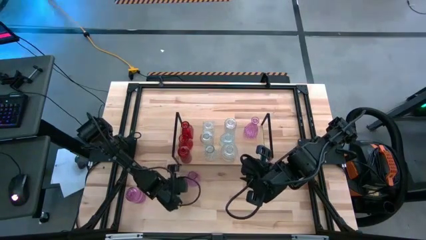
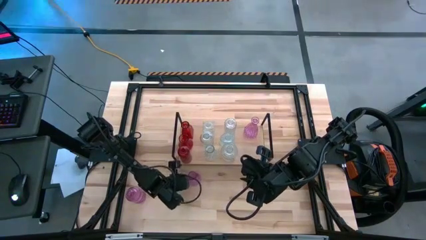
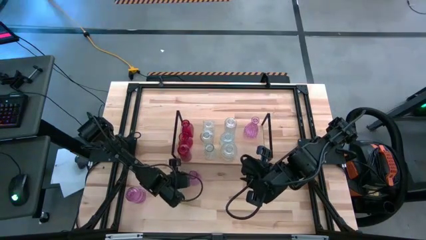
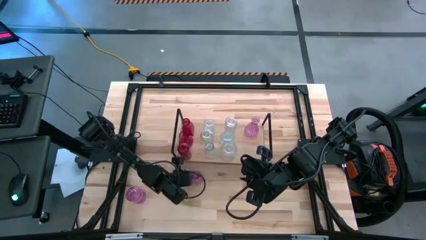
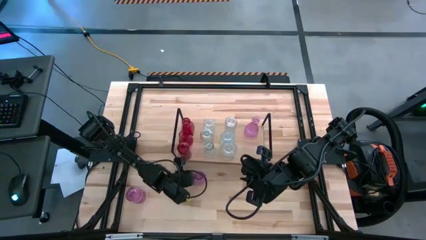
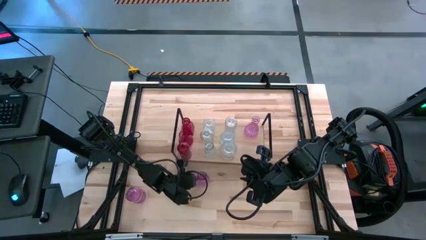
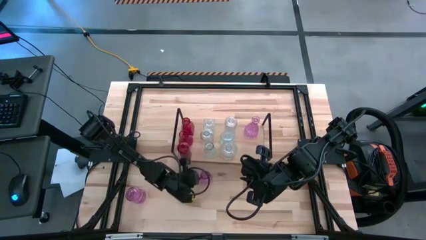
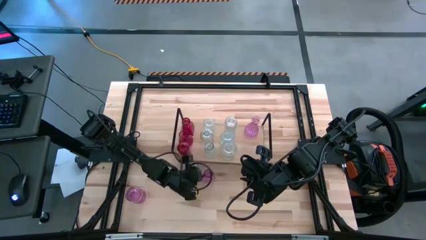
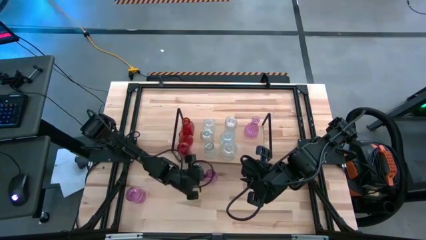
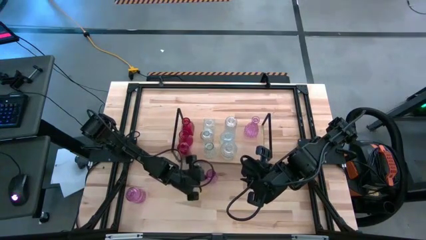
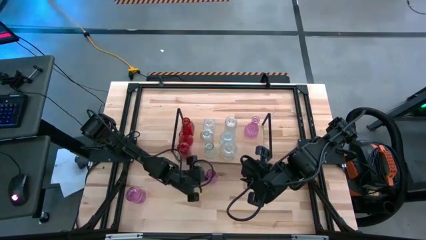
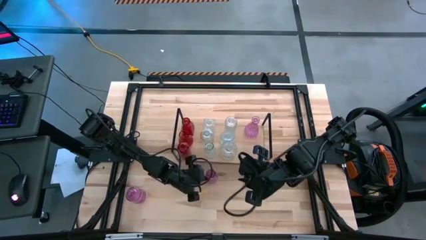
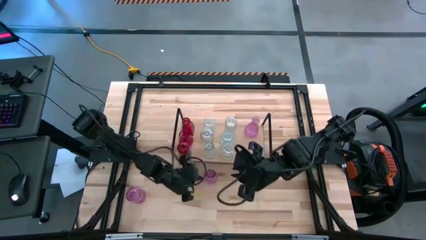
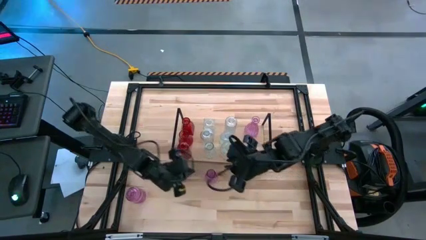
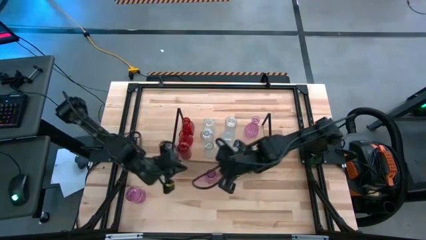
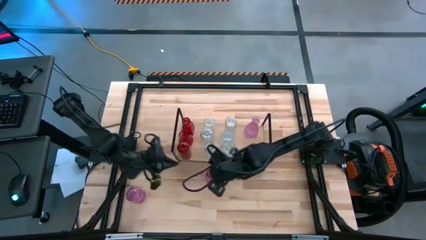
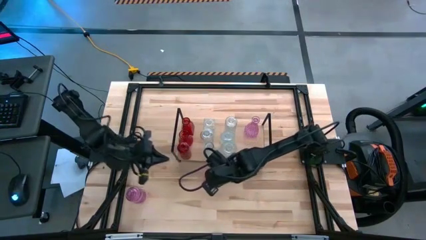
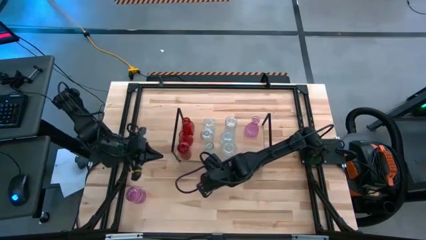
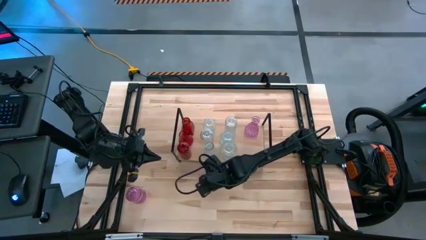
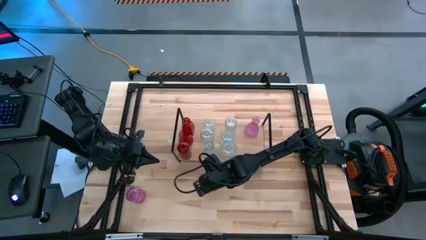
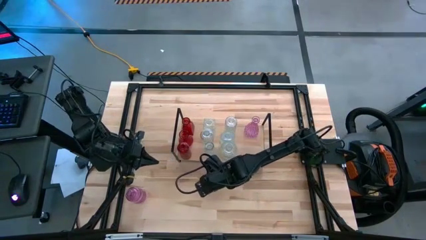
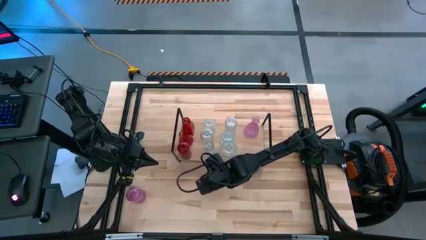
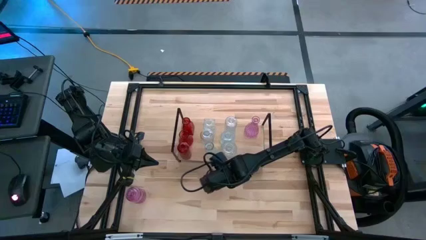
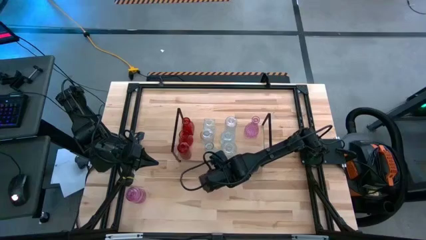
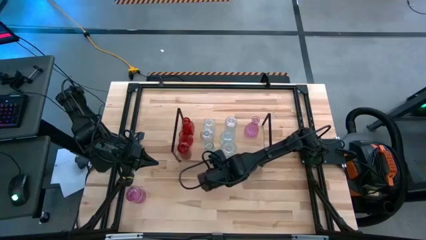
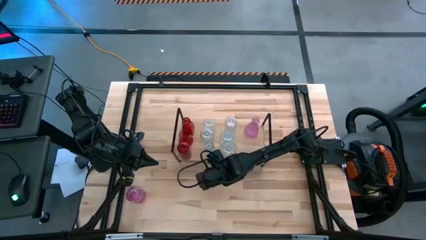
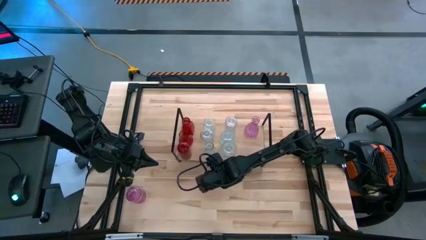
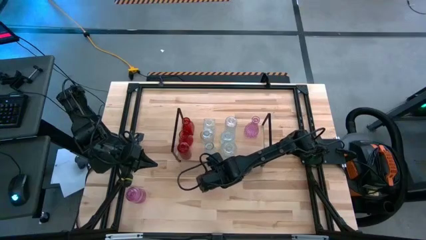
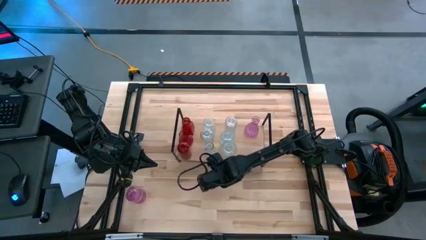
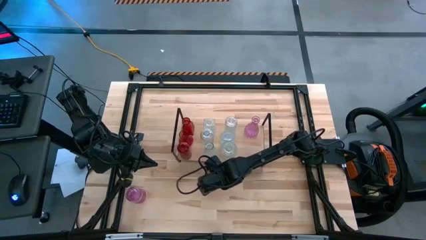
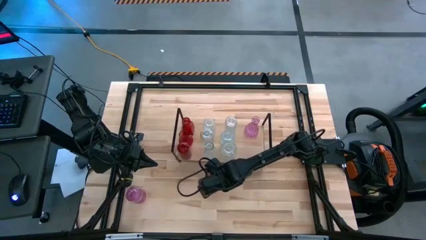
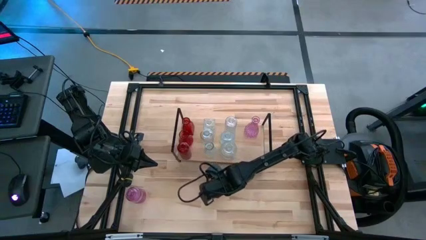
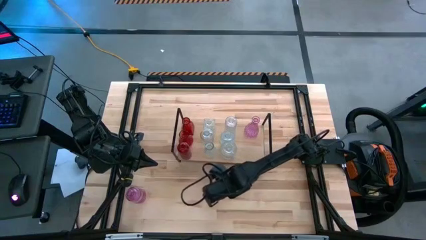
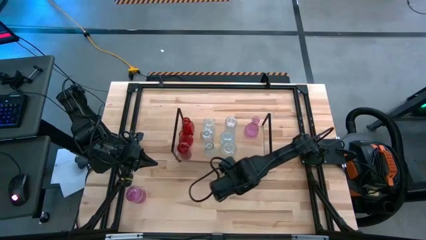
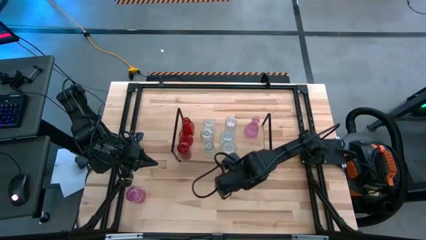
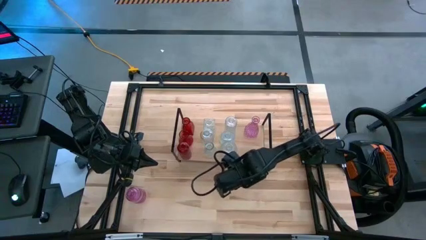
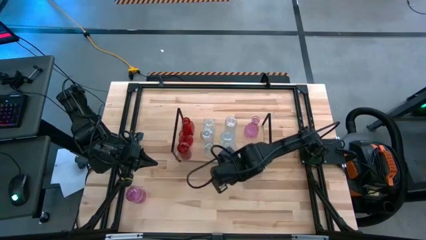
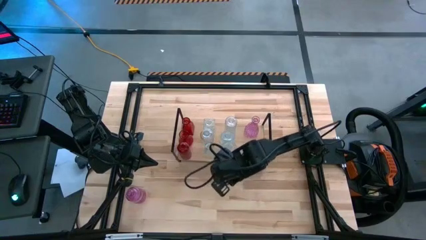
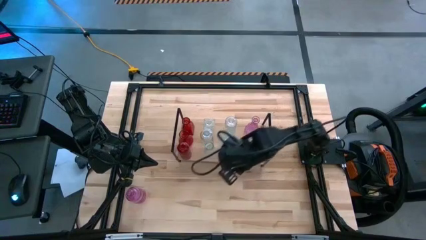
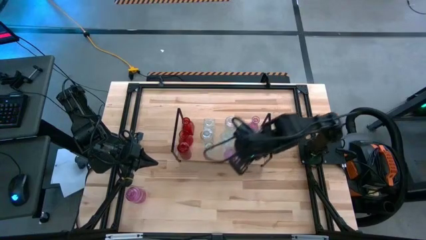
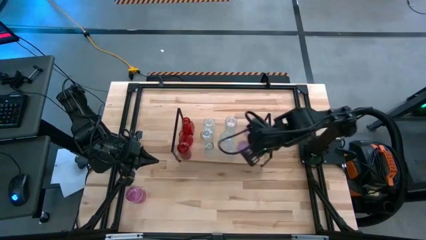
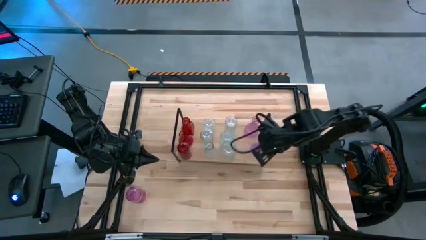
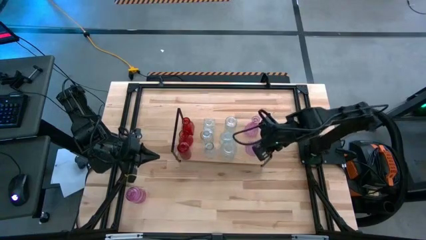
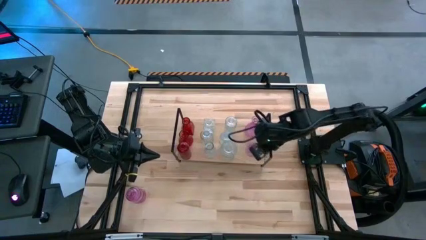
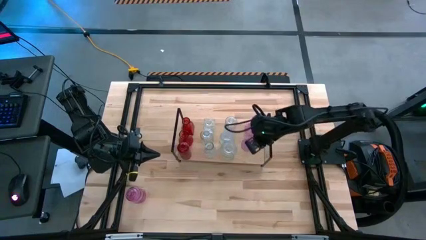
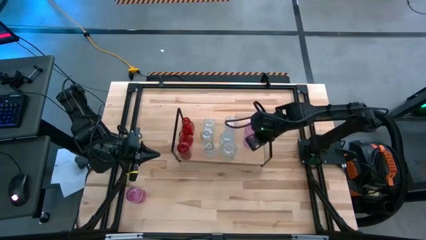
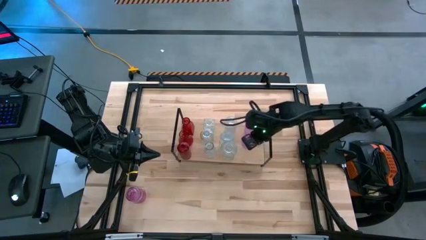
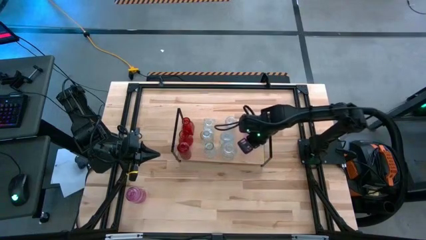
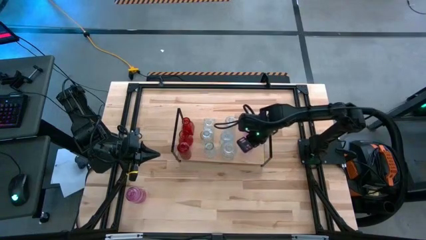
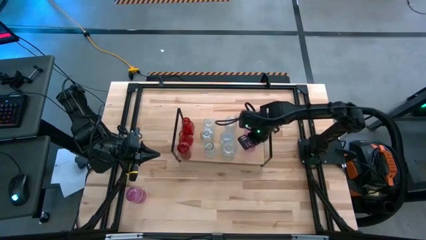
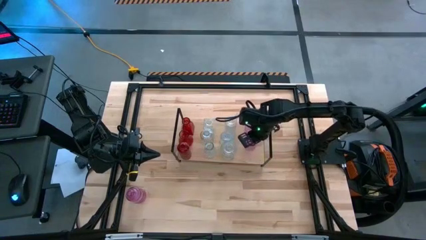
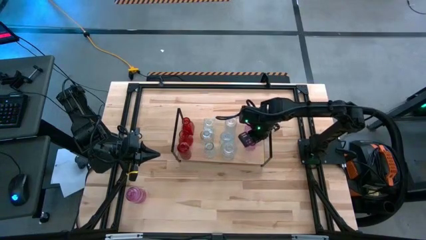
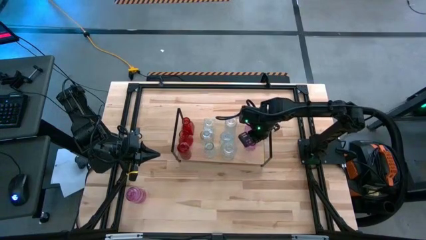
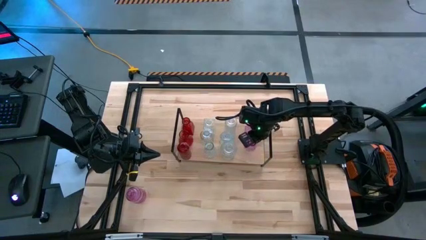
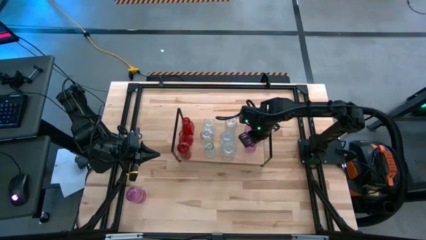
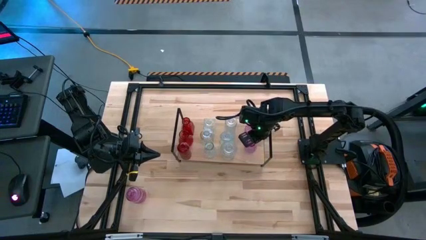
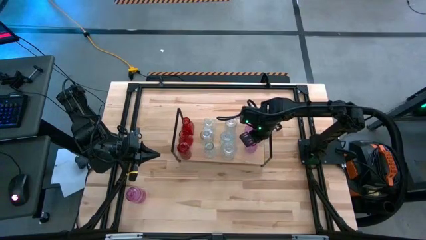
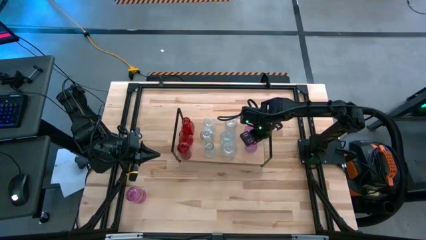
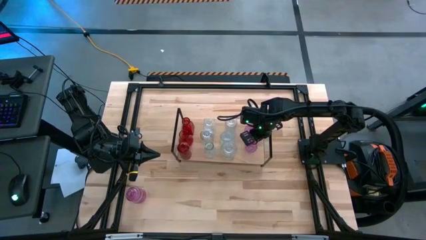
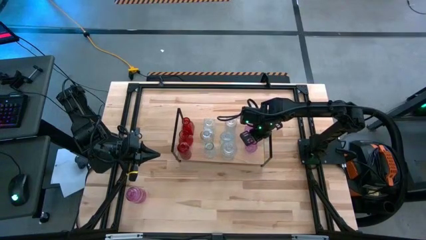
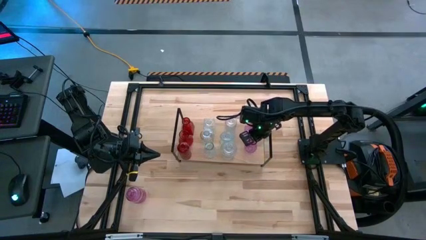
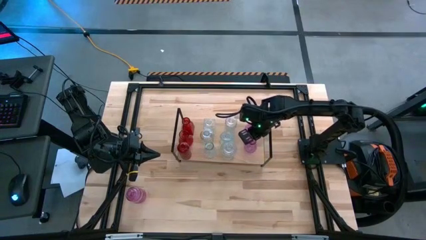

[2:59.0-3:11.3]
Task: sort vases onto shelf
Put the pink transparent vase aligned with the other pink vase on the shelf

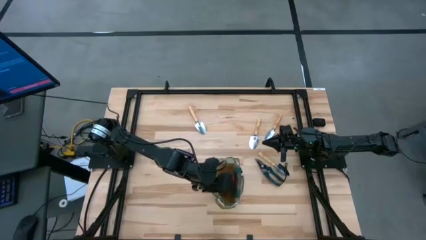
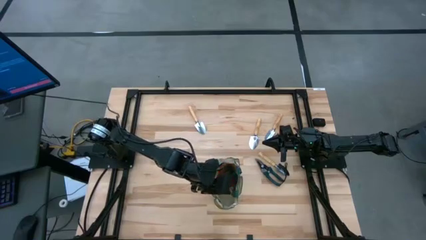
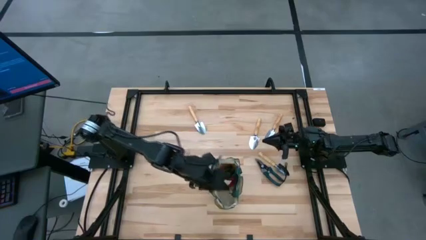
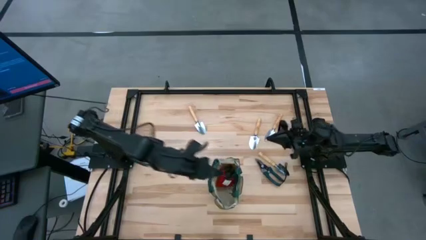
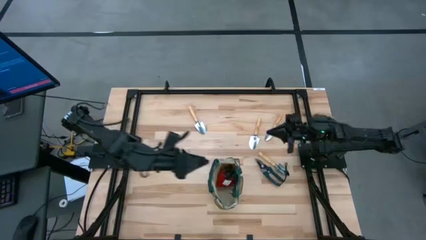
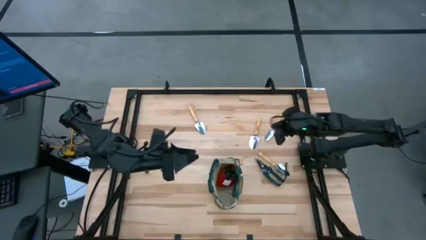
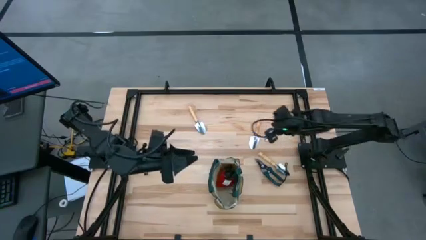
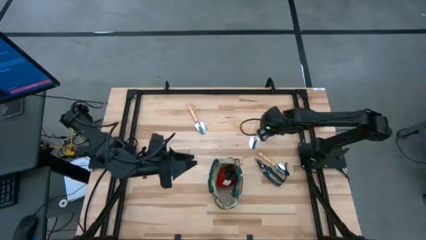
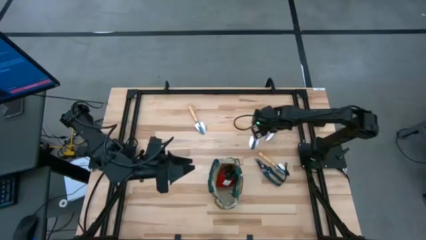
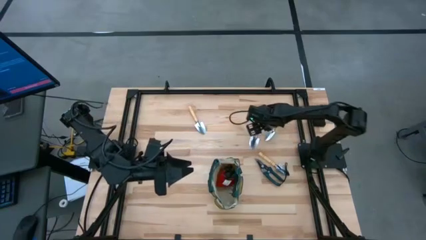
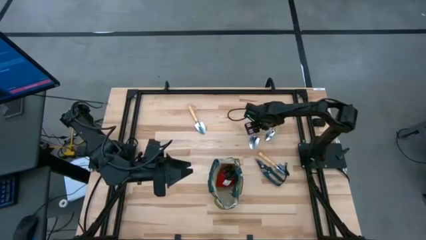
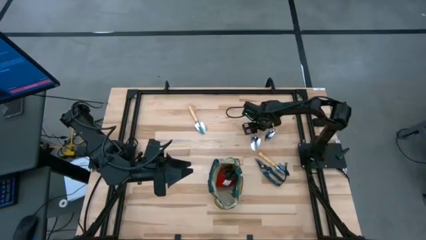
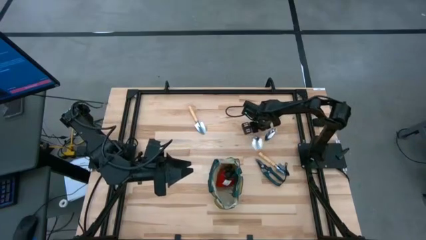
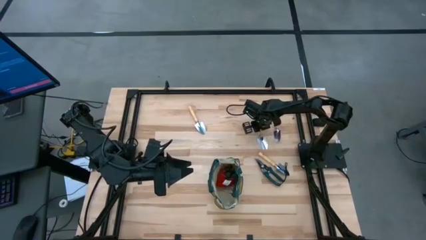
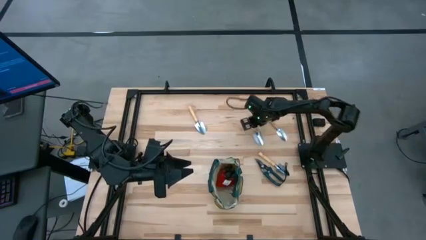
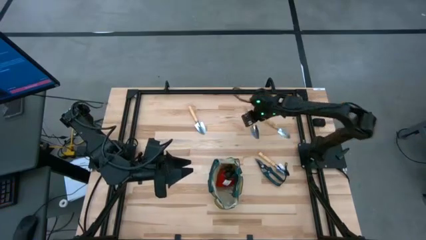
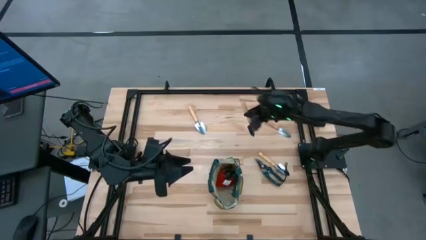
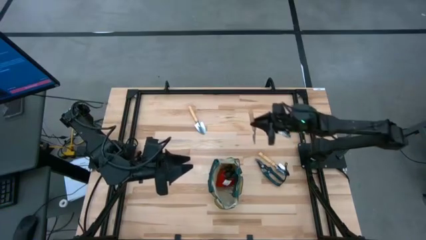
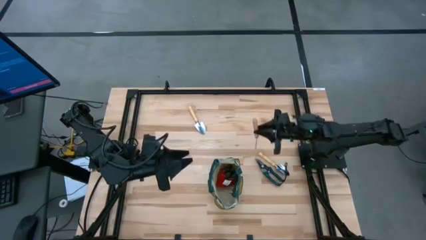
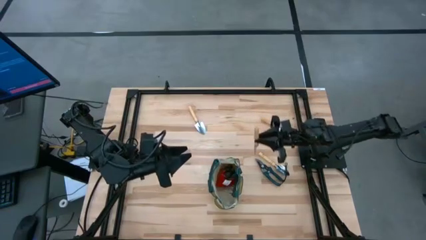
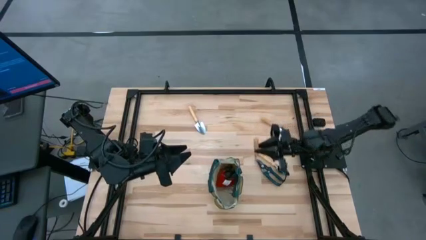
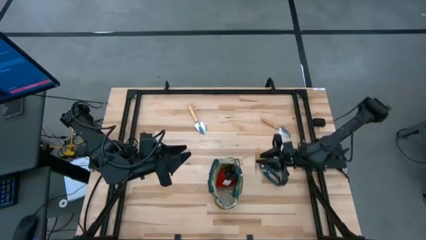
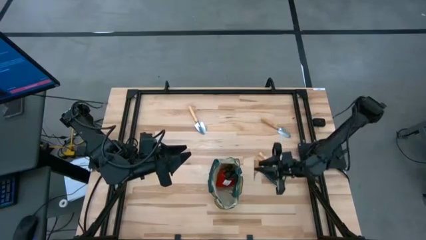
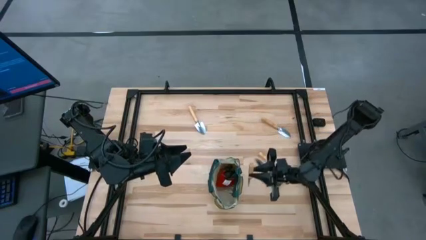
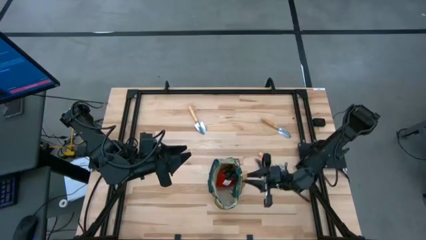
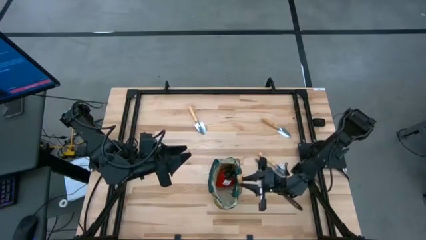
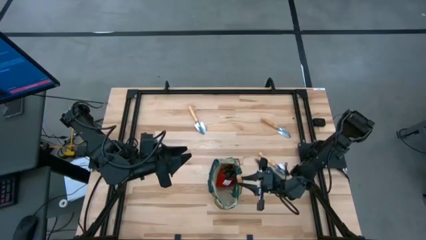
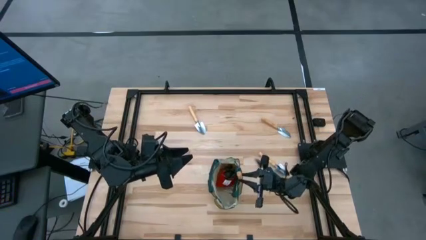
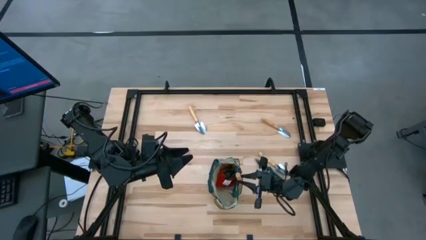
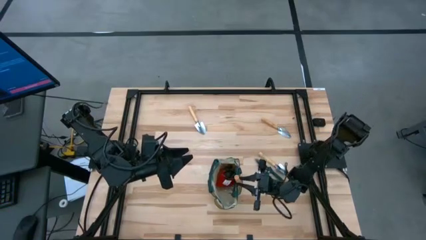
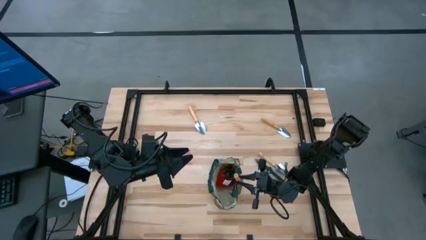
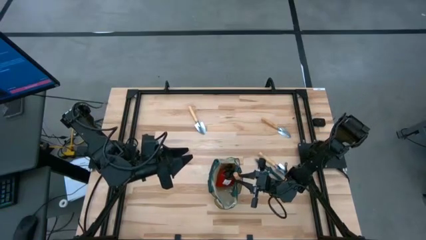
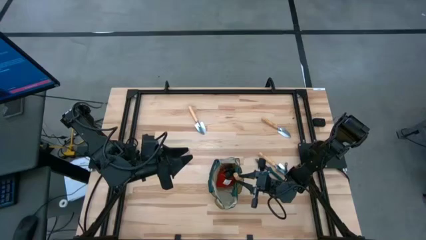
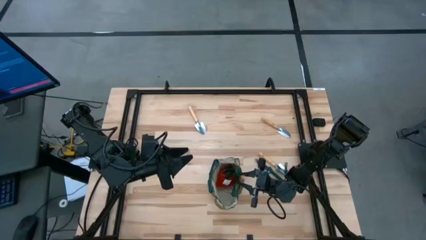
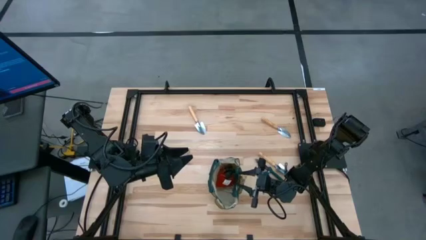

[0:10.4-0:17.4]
Task: Pick & Place Garden tools in Gardening bag
Put the brown trowel into the green gardening bag
